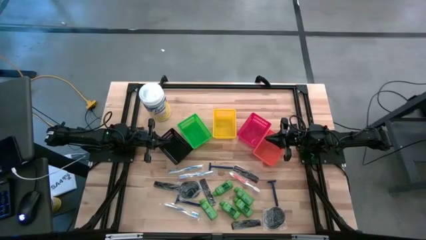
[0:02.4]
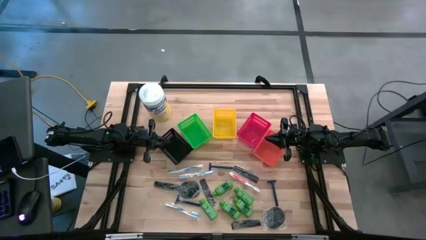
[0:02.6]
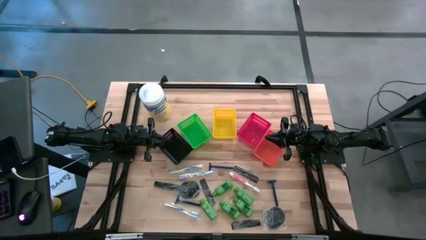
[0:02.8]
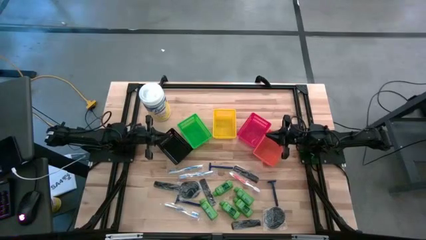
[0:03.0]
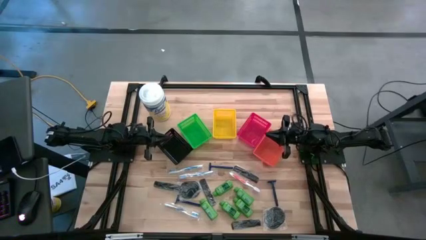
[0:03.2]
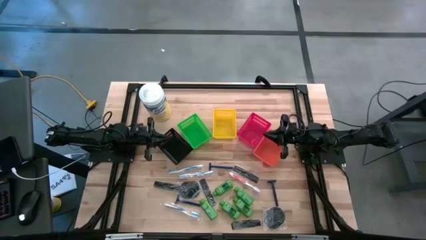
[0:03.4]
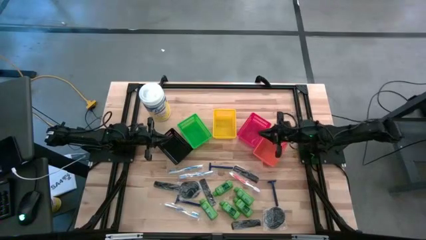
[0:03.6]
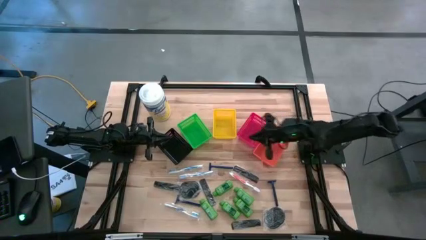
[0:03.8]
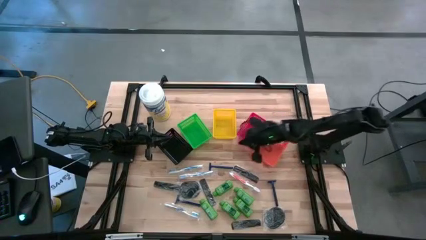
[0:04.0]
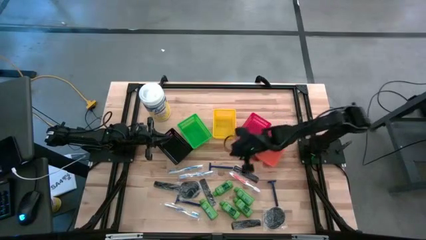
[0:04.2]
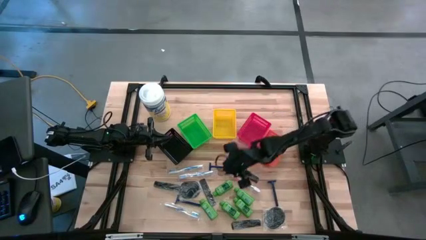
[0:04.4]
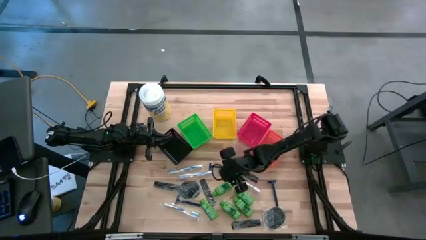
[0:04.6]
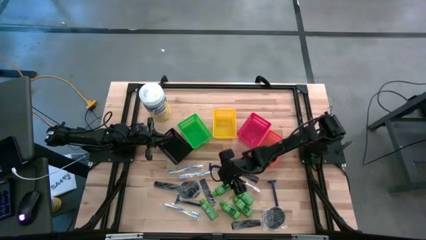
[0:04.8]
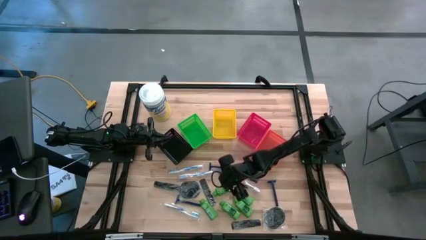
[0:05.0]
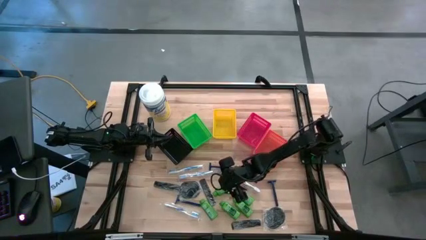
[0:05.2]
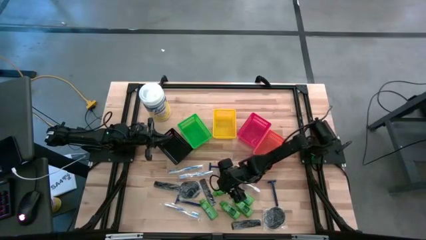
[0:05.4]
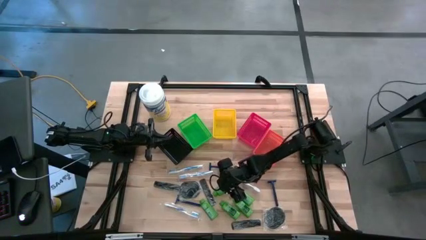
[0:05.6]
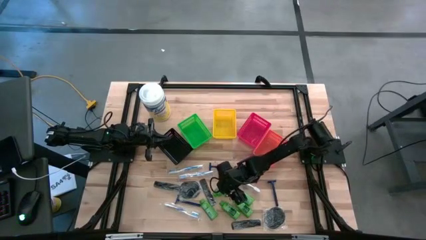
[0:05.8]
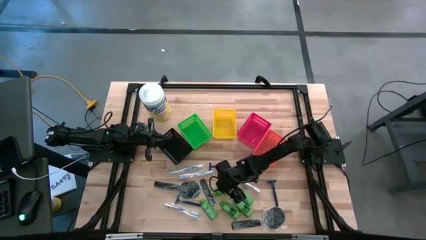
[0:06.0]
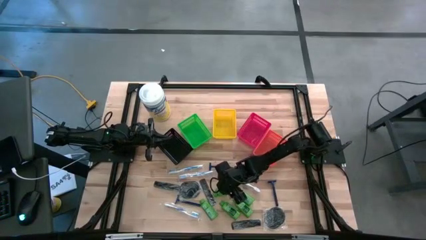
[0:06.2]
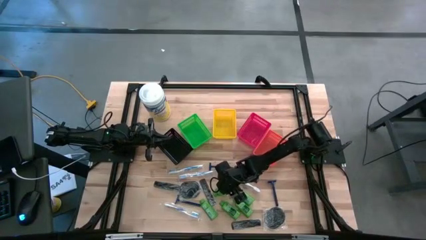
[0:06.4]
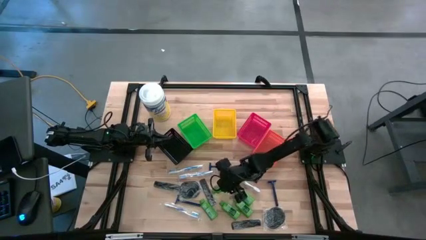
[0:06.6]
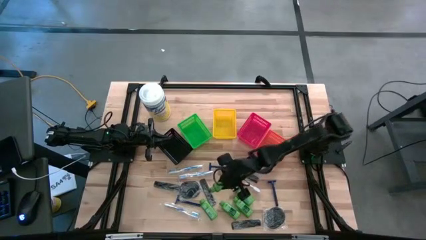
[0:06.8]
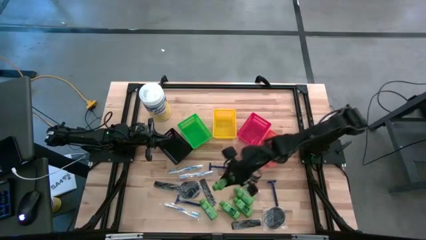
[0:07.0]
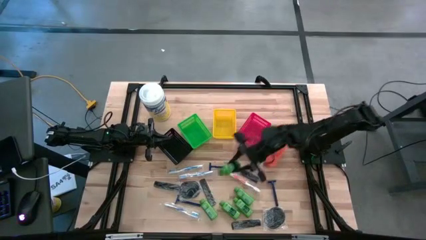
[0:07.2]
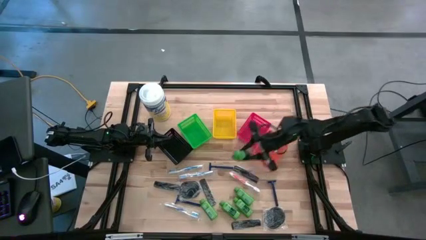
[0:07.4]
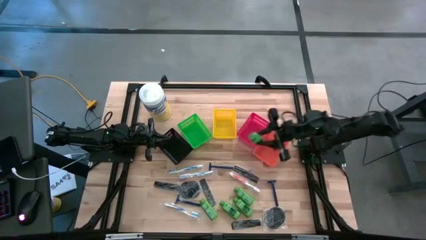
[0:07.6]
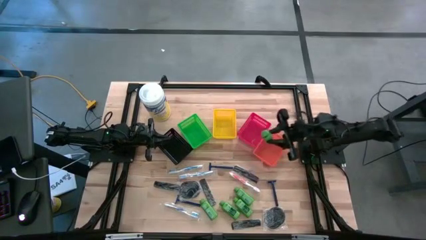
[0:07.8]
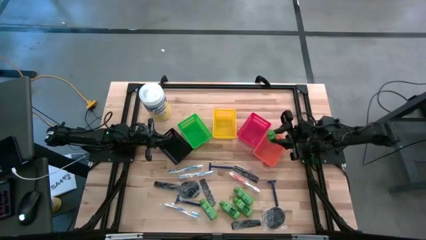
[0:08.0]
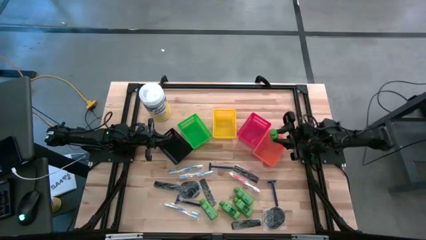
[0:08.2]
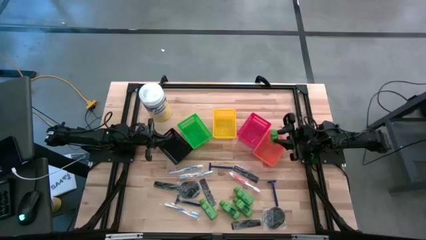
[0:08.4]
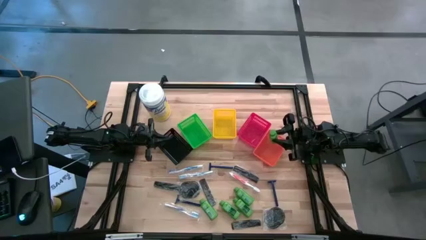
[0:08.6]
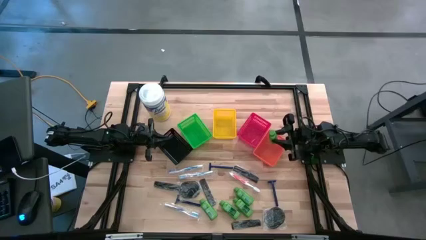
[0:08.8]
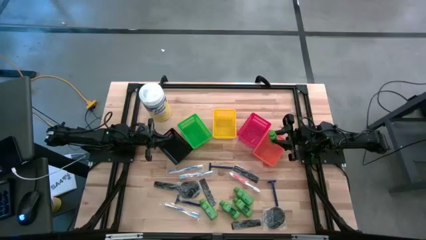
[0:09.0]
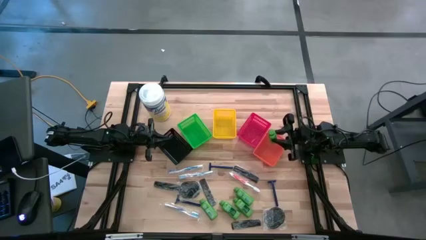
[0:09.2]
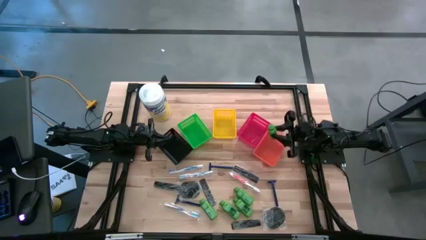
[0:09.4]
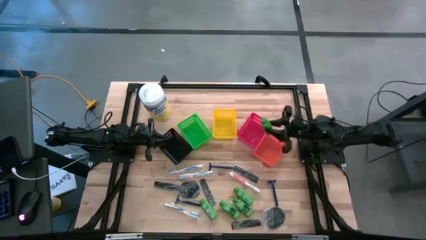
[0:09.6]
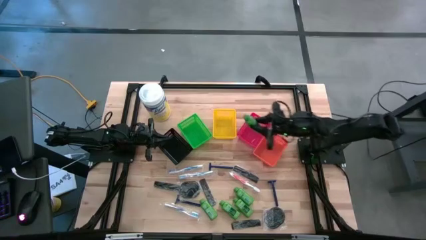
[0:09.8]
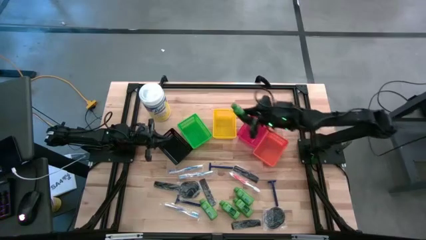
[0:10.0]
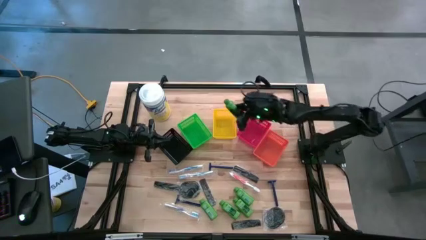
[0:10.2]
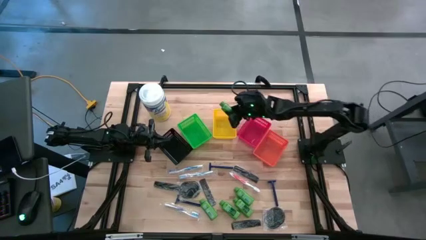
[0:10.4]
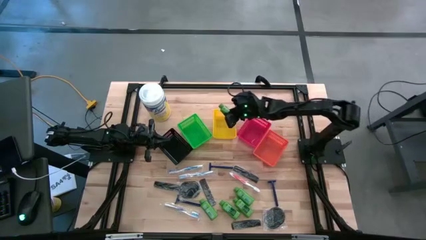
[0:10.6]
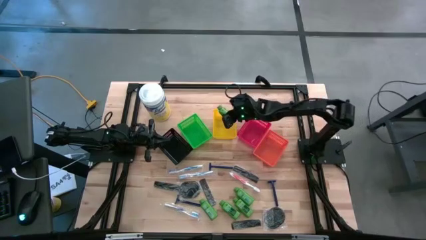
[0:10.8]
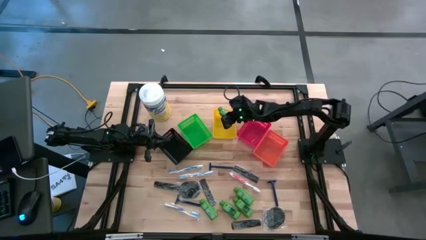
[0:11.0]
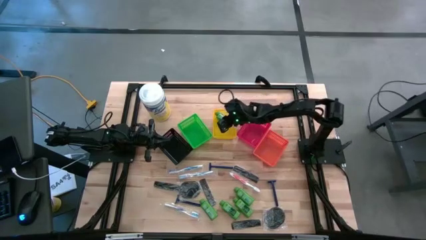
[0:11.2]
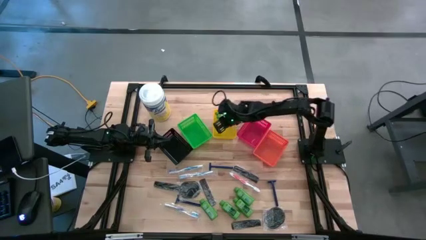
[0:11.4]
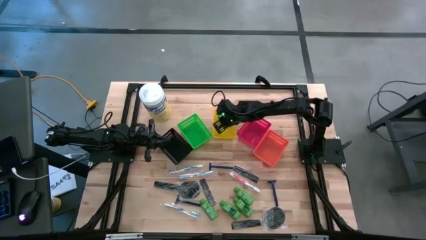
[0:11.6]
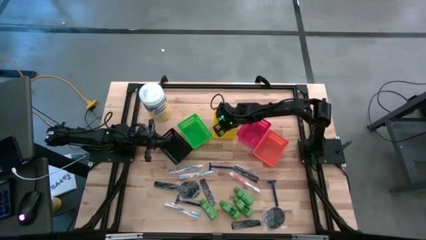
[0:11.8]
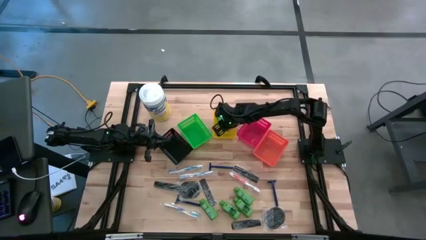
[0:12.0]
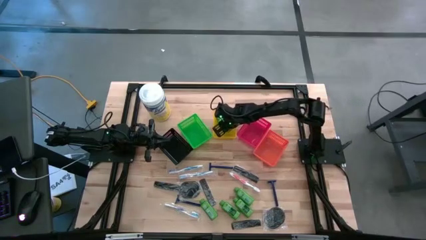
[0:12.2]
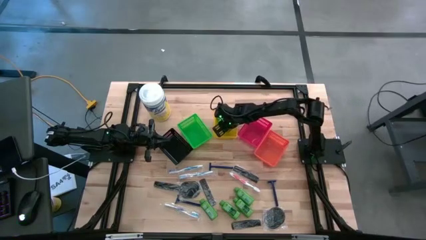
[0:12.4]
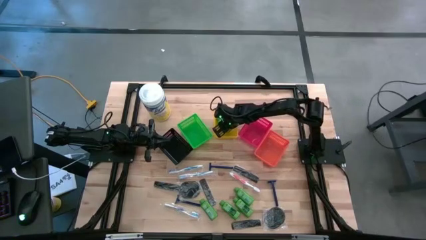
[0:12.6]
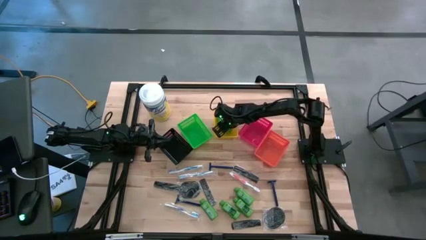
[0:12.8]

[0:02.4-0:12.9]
Task: Pick & Place Travel size toiletries
Put the green bottle shampoo into the yellow bin
